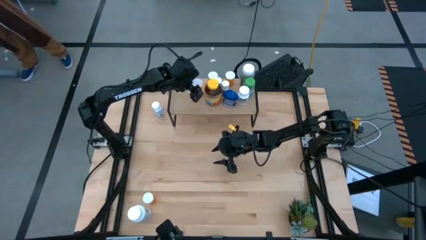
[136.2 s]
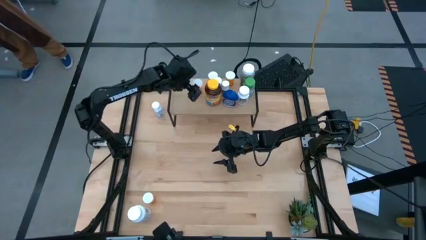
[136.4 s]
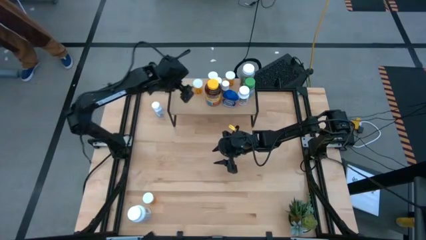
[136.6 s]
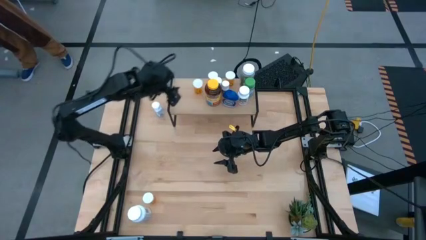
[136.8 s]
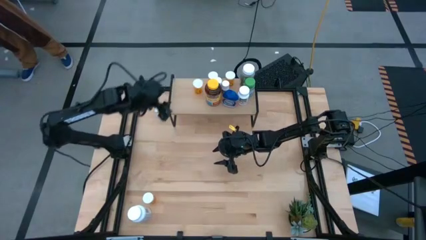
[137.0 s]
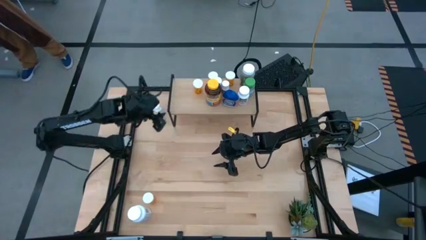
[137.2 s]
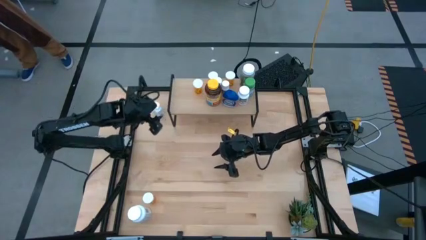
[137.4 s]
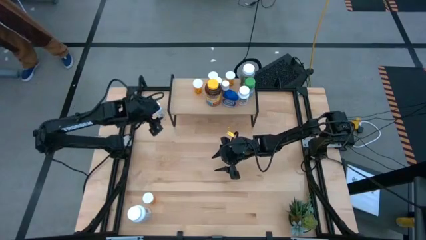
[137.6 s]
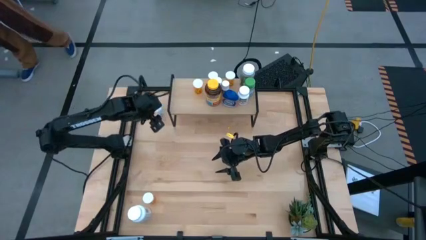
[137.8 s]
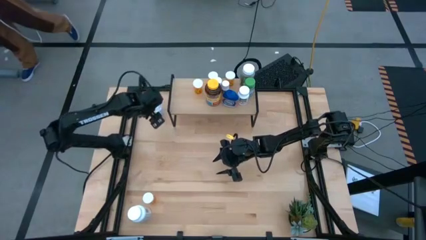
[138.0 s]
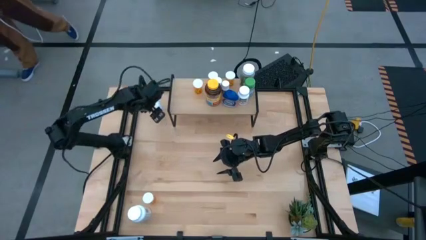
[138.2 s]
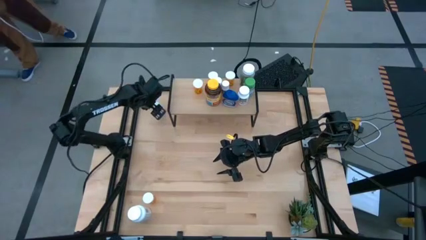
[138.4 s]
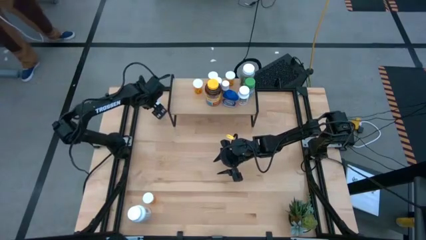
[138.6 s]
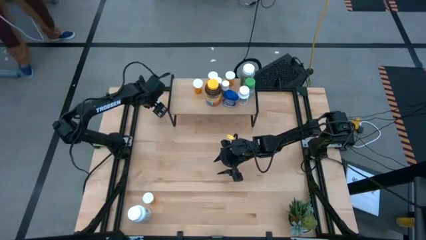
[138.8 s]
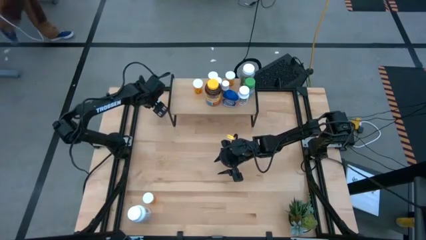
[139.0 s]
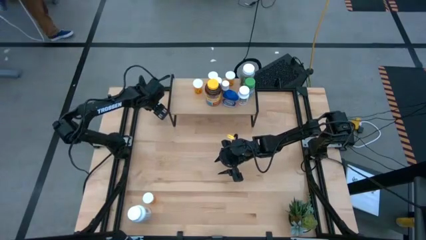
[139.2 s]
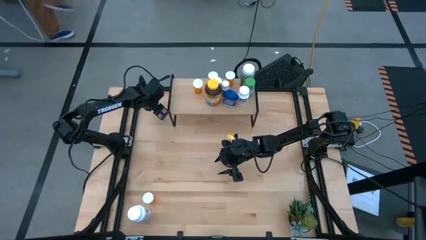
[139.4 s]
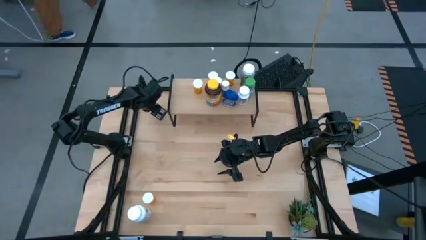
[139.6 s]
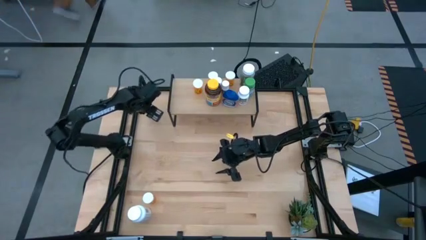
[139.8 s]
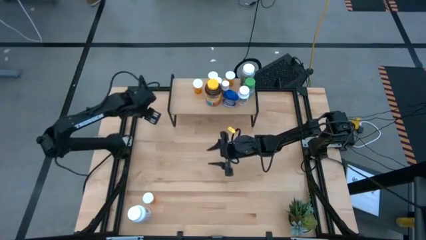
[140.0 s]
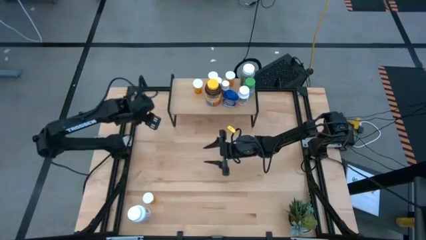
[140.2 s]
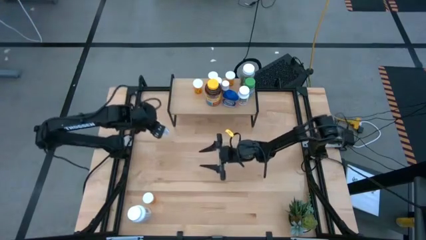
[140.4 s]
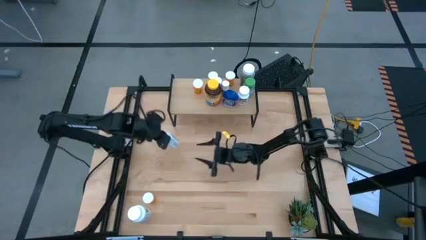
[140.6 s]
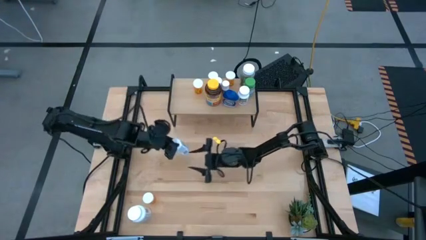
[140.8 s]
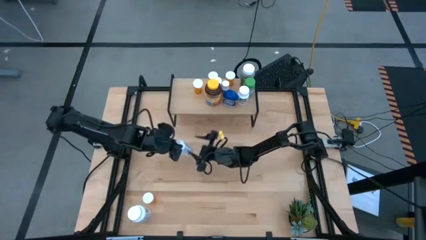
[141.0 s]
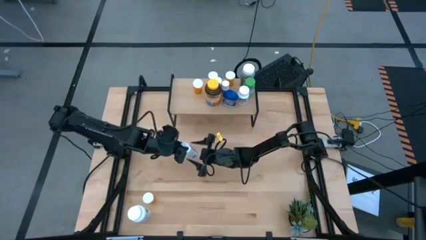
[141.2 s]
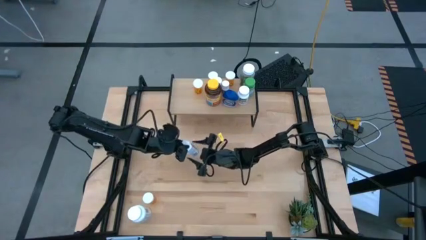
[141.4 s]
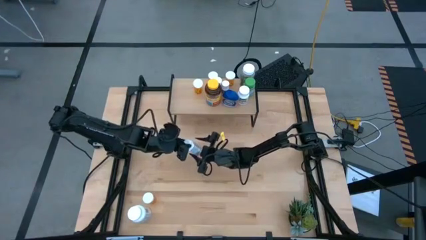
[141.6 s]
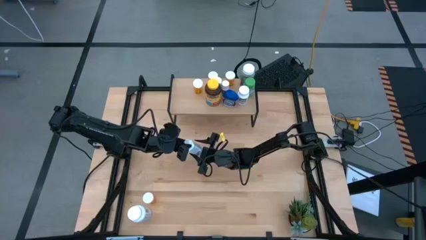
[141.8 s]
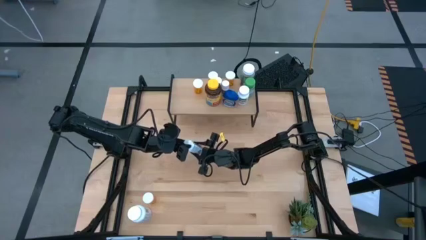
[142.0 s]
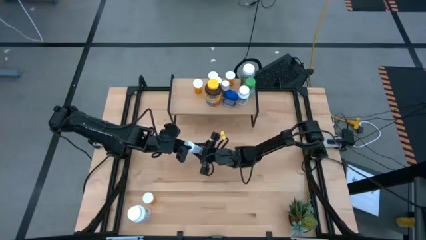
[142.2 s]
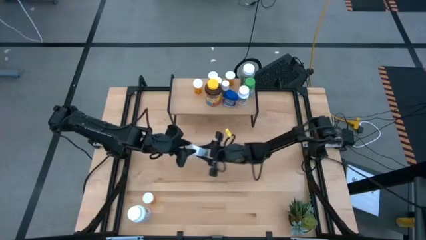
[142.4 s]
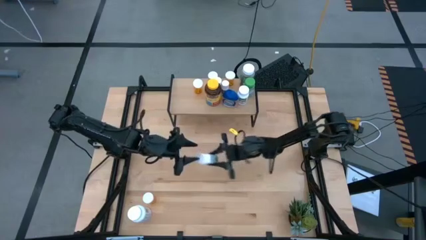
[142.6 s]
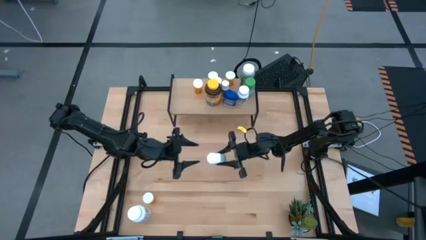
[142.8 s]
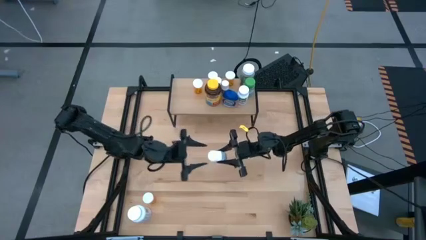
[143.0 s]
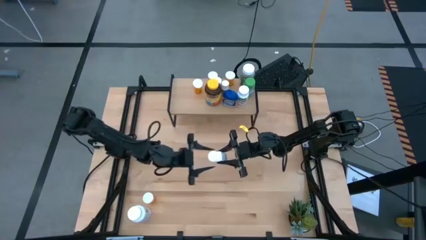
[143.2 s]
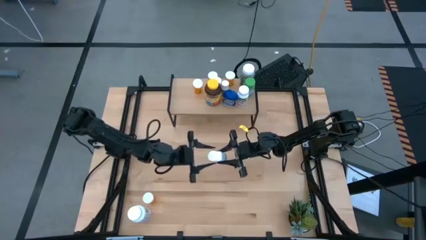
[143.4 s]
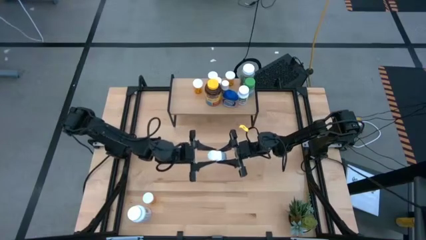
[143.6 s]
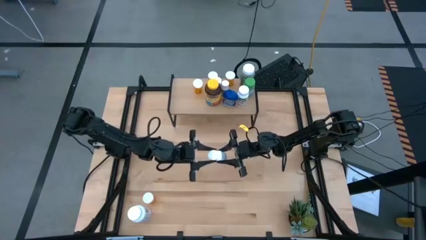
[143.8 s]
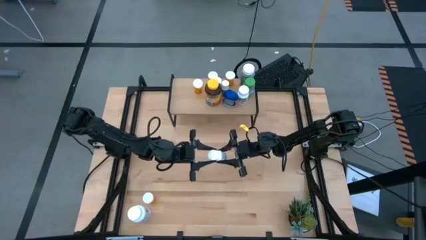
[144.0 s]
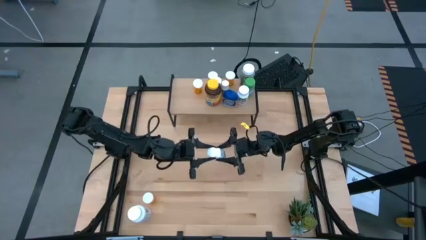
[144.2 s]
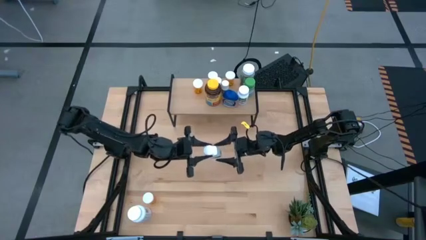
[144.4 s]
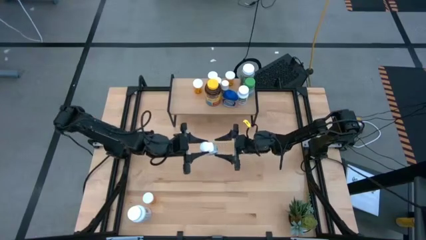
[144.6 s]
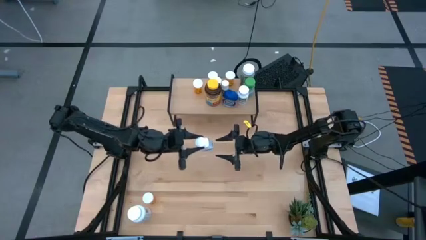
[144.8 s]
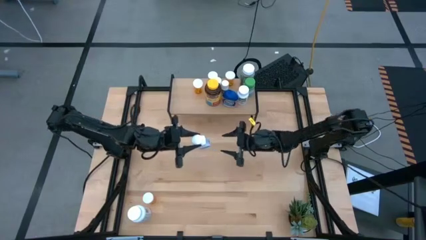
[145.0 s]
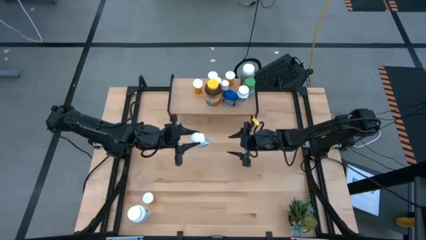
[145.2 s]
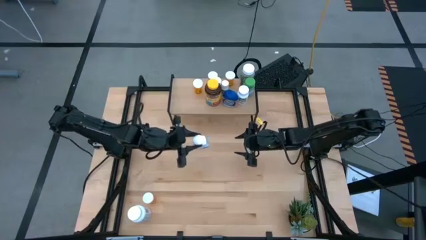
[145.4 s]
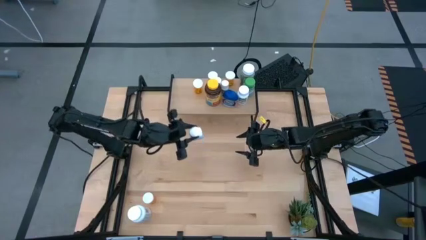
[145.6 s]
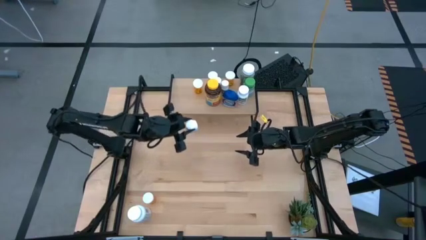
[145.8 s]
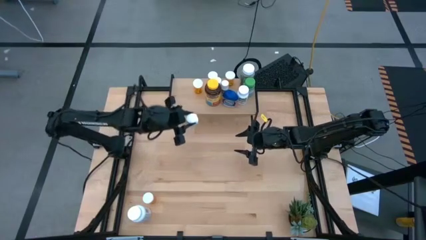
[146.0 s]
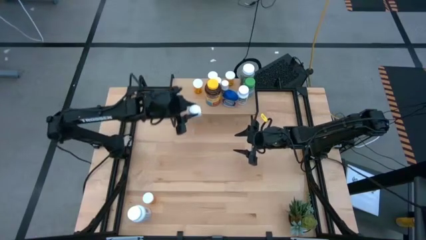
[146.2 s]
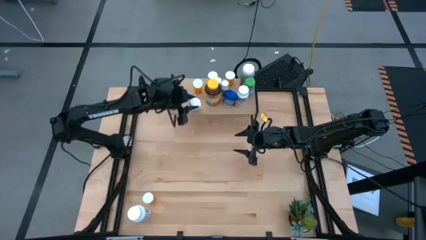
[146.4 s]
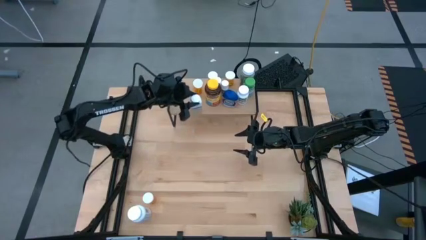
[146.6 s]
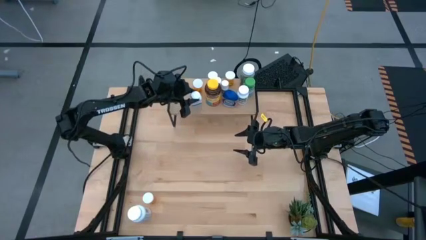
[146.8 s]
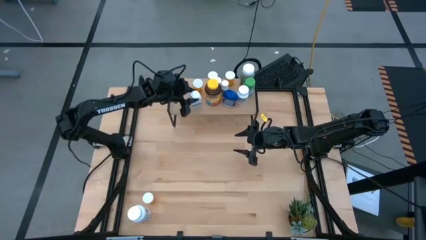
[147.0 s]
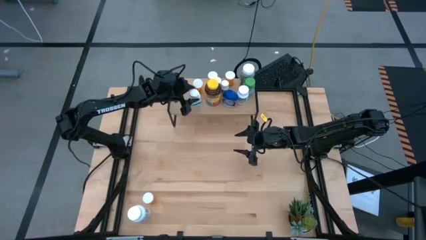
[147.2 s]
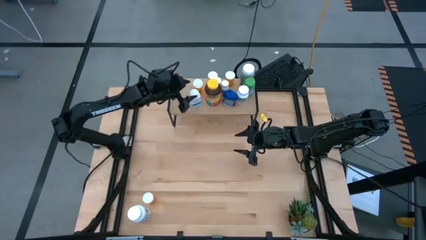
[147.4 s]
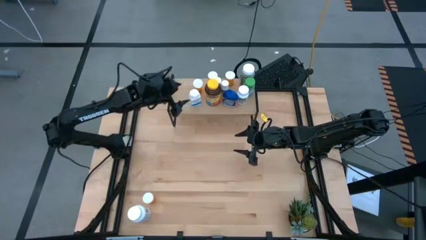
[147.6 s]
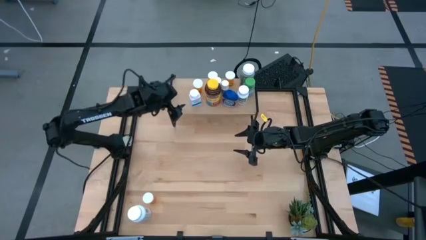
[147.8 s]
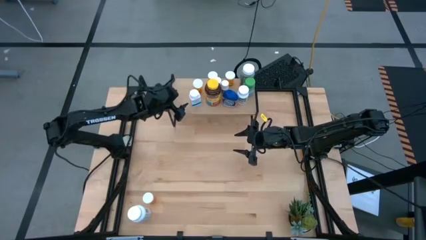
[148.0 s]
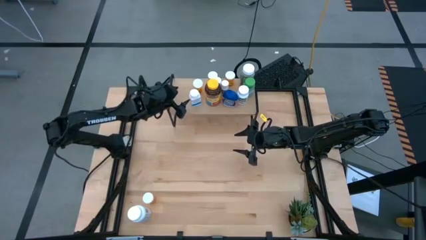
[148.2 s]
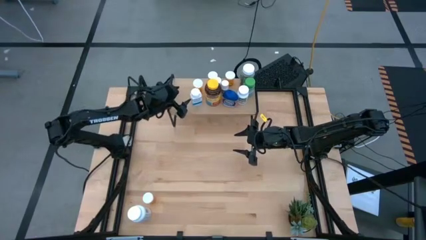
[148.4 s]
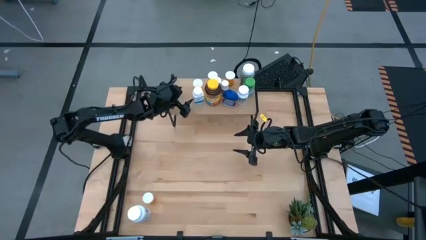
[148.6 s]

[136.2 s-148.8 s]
Task: Pick and place medicine bottles onto shelf by color
Put the white and blue pill bottle on the shelf

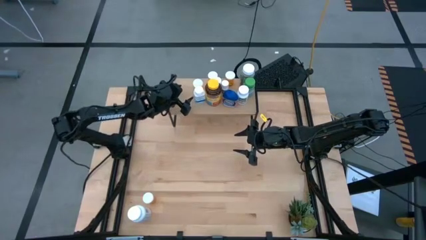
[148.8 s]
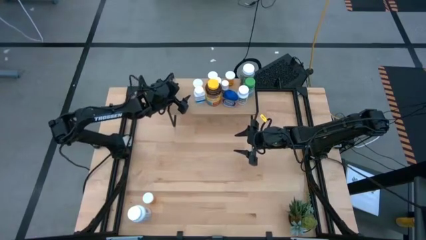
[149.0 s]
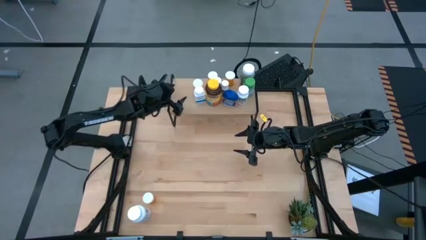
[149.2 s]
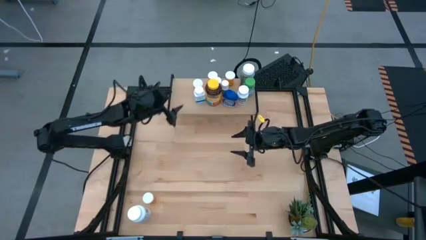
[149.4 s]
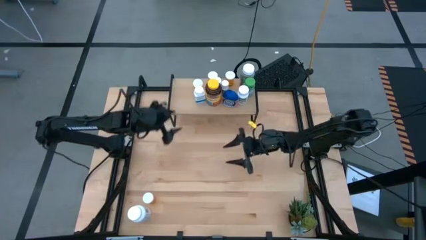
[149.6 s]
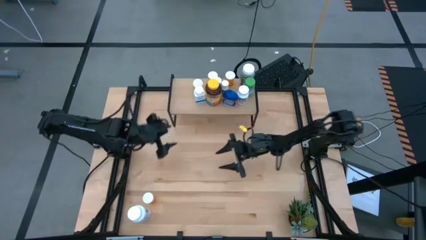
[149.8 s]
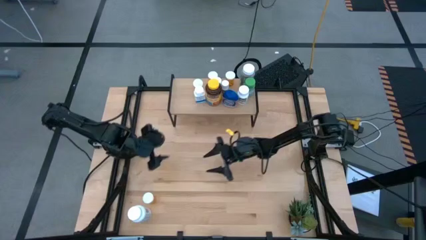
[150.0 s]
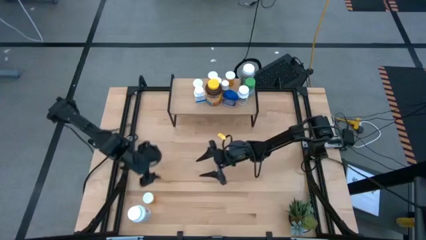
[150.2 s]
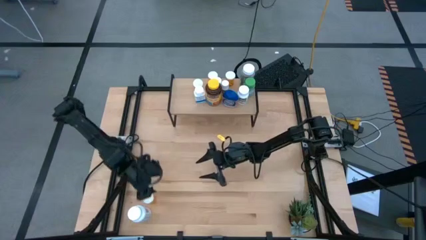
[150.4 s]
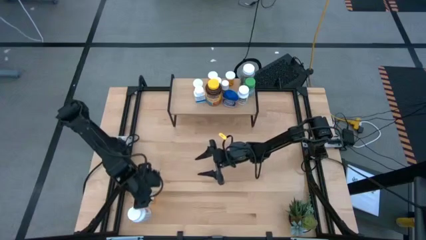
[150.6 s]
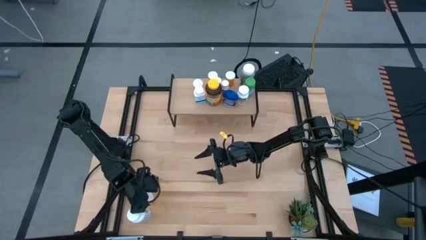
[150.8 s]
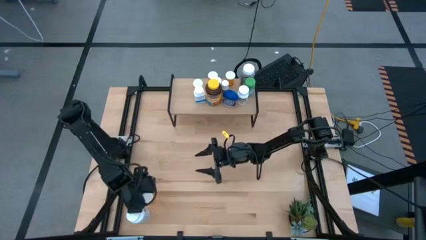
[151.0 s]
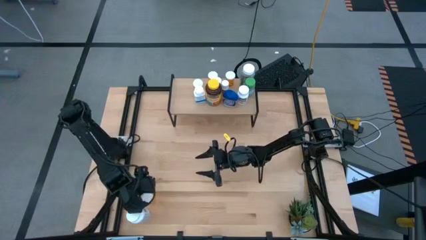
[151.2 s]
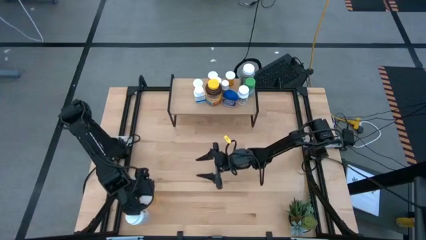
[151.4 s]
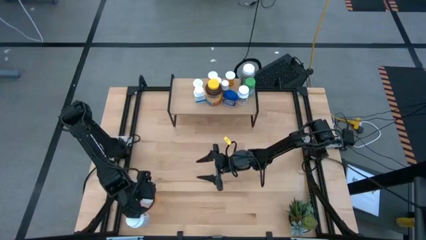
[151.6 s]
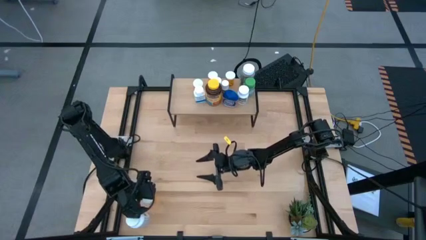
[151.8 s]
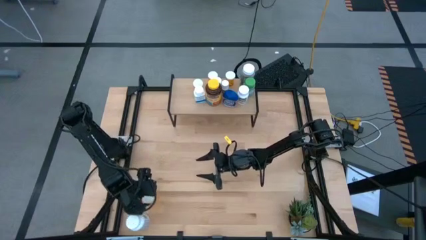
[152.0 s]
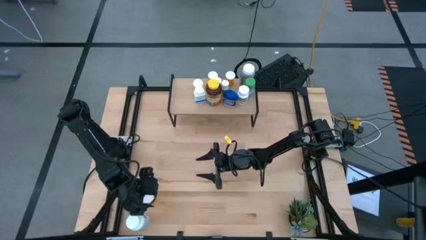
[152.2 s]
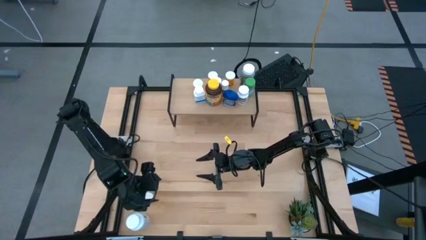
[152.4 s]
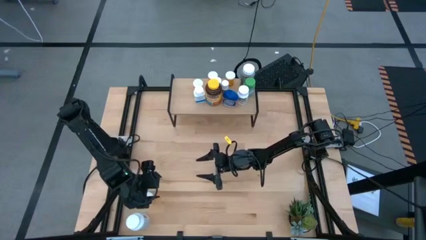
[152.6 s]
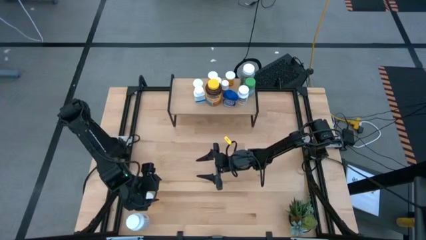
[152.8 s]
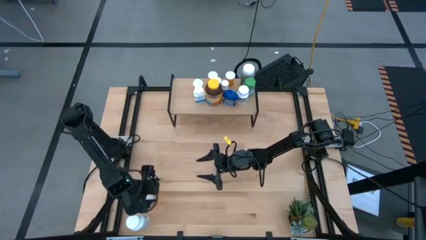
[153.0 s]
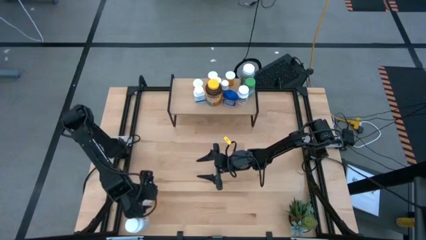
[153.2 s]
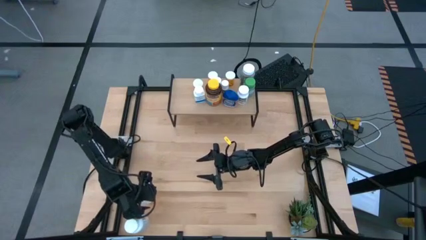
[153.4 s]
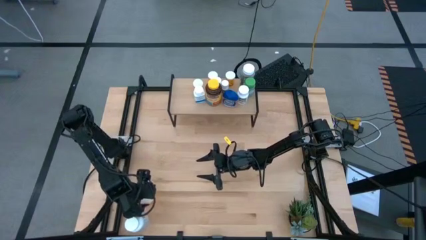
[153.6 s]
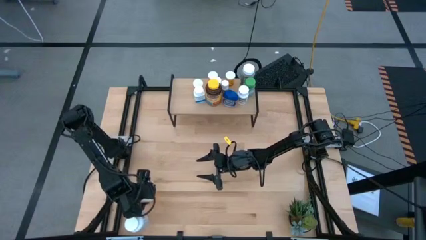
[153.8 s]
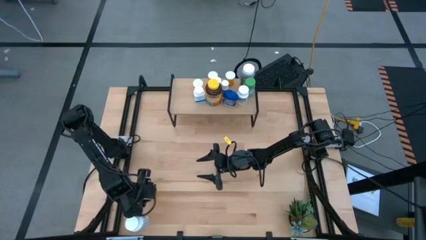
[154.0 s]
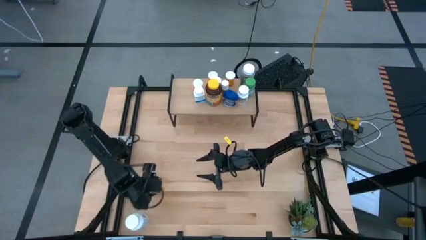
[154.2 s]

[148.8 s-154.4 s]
Put the orange pill bottle on the shelf
